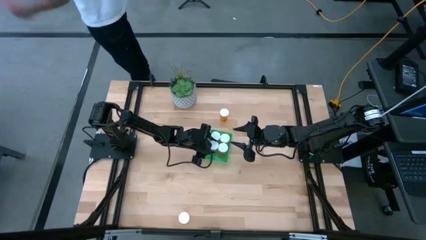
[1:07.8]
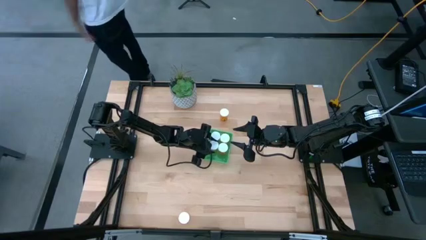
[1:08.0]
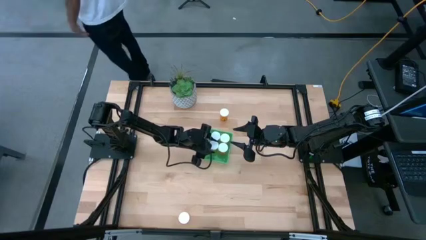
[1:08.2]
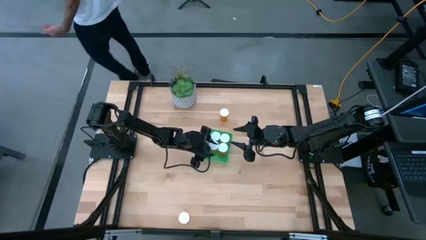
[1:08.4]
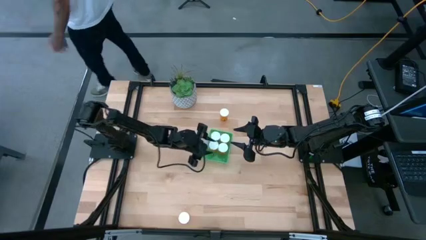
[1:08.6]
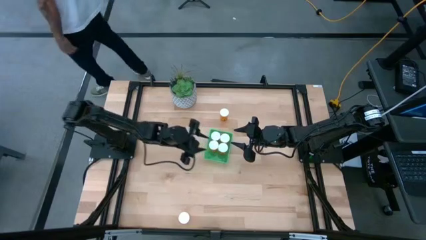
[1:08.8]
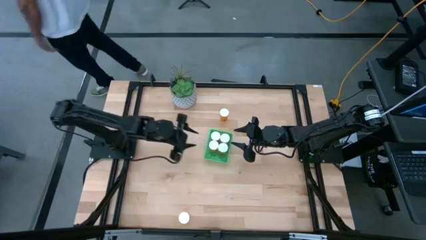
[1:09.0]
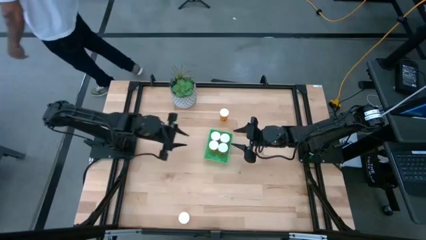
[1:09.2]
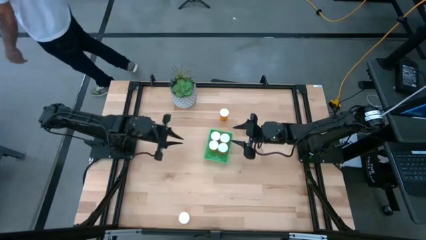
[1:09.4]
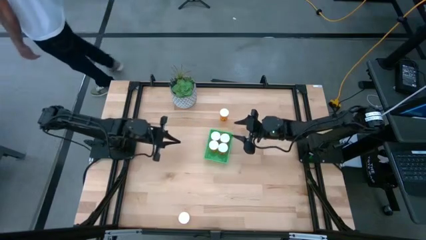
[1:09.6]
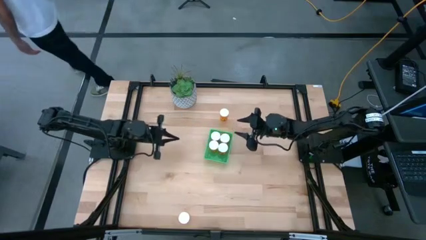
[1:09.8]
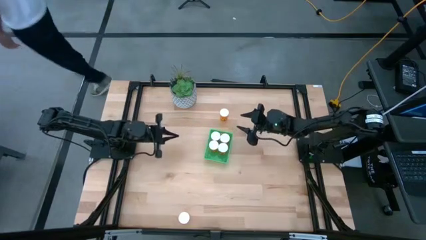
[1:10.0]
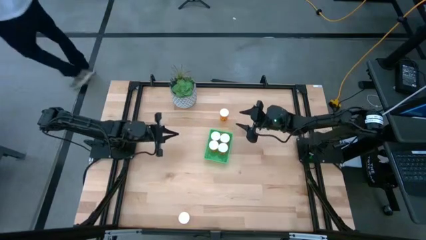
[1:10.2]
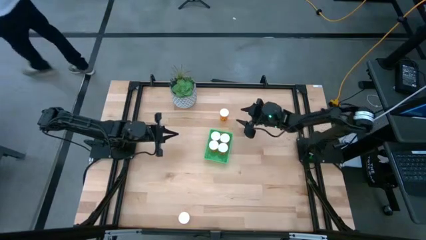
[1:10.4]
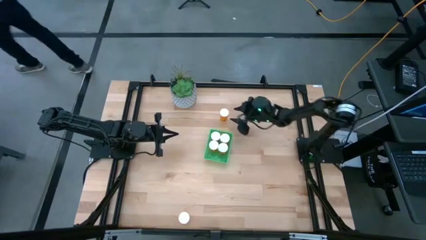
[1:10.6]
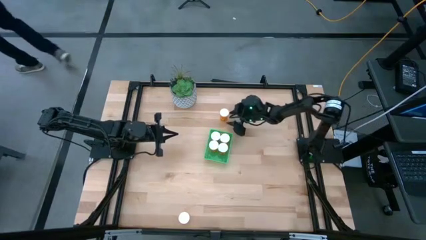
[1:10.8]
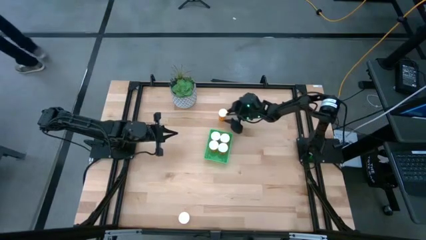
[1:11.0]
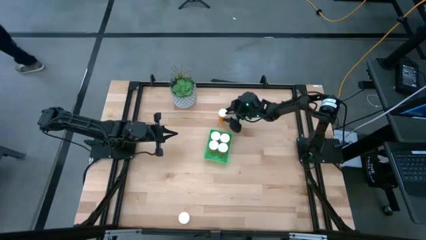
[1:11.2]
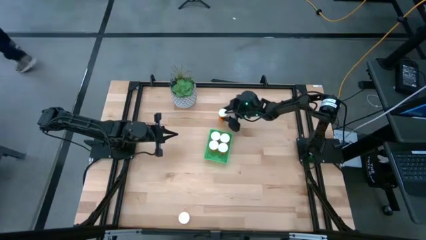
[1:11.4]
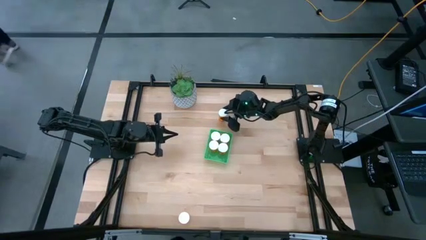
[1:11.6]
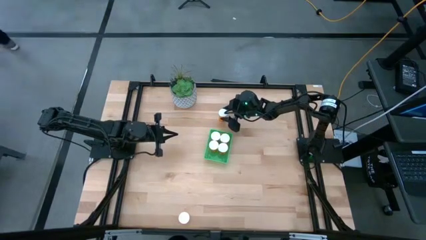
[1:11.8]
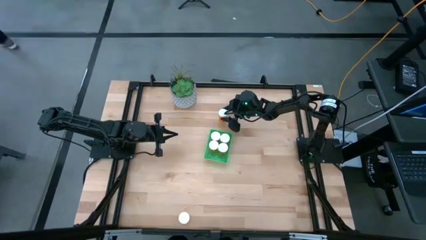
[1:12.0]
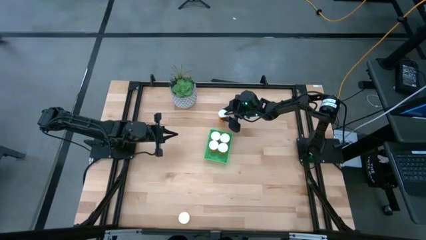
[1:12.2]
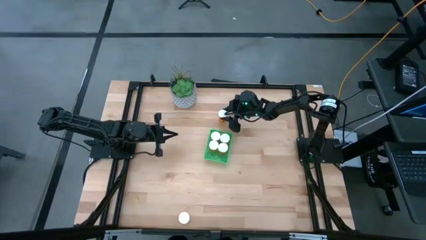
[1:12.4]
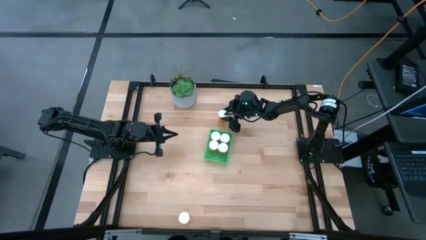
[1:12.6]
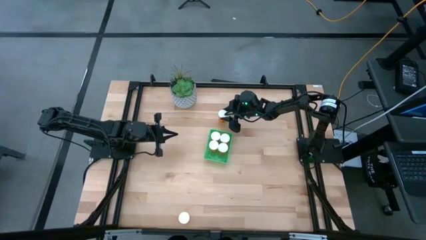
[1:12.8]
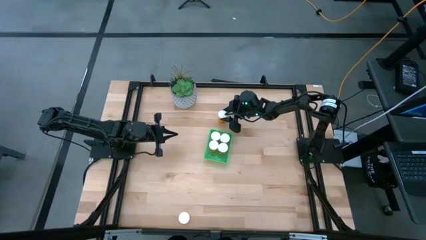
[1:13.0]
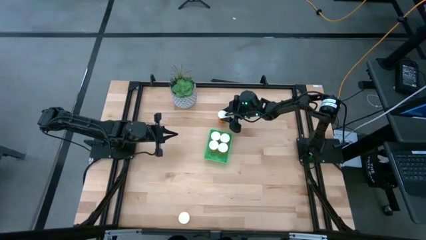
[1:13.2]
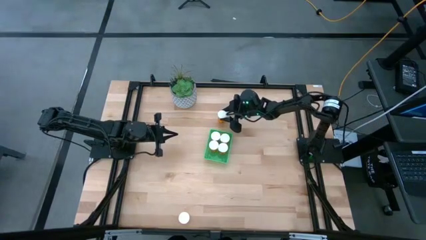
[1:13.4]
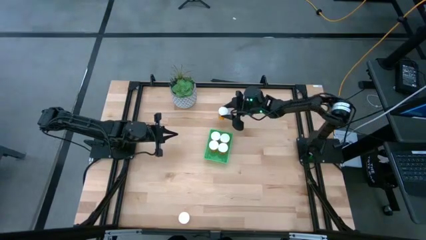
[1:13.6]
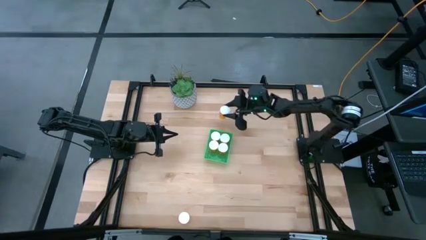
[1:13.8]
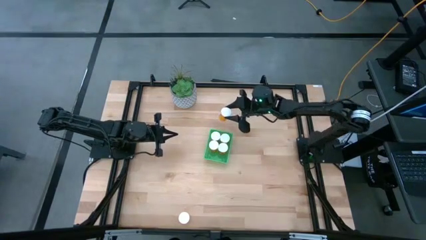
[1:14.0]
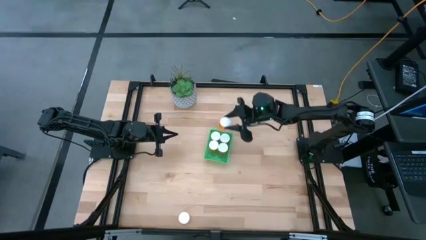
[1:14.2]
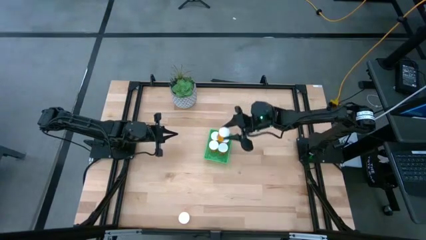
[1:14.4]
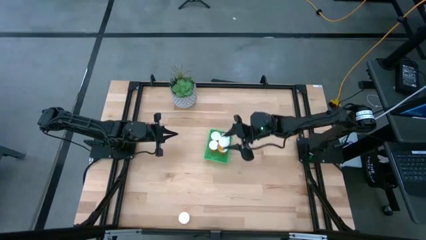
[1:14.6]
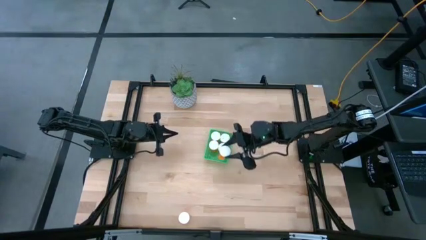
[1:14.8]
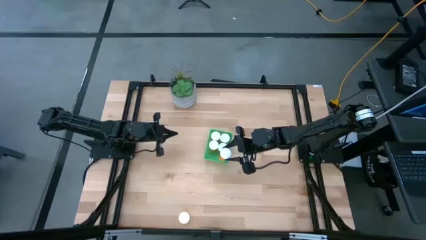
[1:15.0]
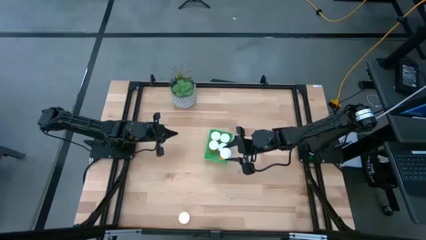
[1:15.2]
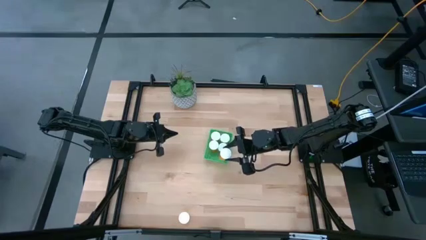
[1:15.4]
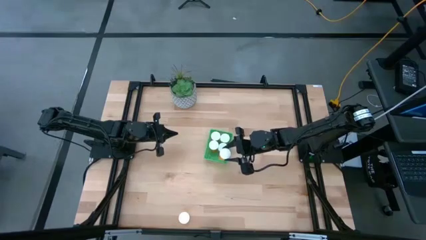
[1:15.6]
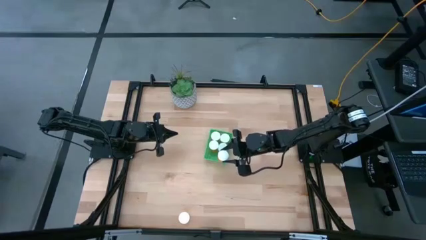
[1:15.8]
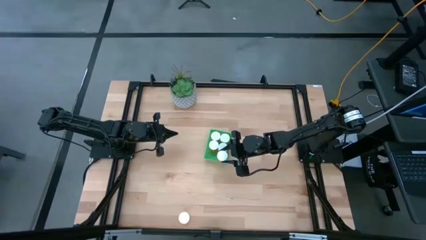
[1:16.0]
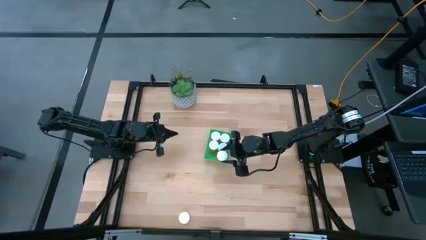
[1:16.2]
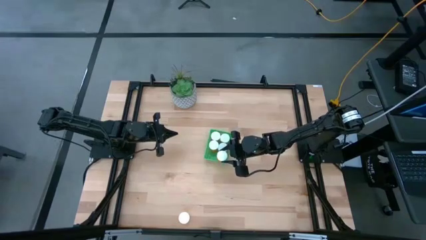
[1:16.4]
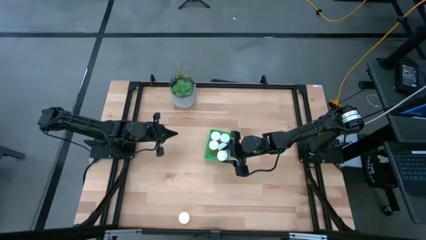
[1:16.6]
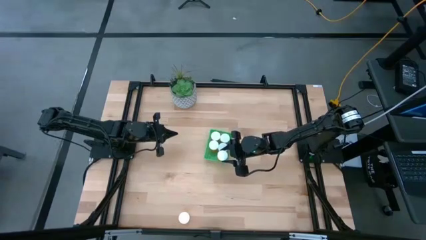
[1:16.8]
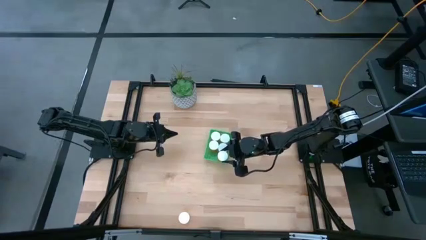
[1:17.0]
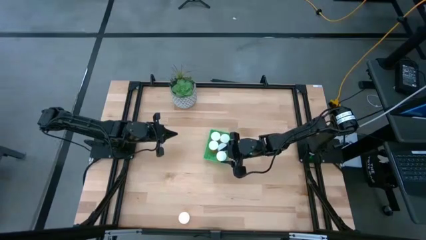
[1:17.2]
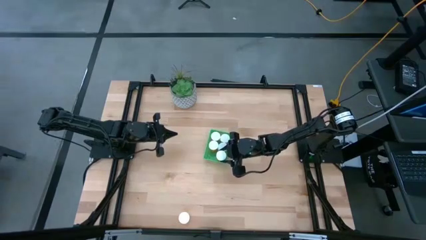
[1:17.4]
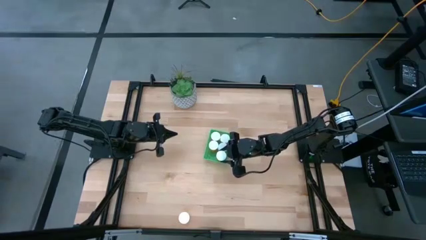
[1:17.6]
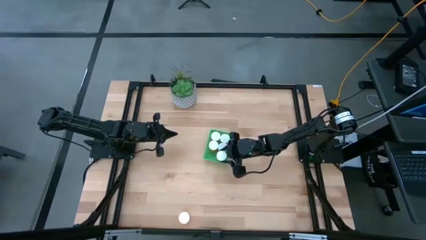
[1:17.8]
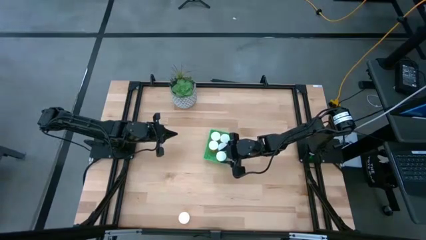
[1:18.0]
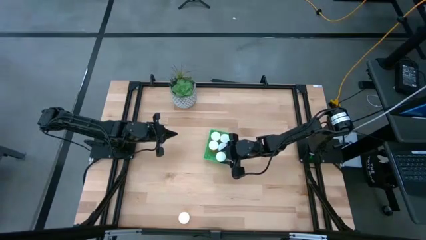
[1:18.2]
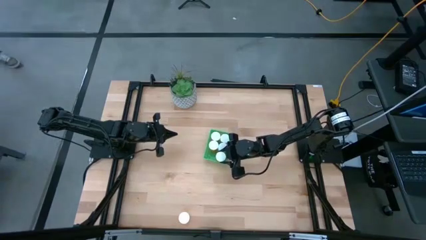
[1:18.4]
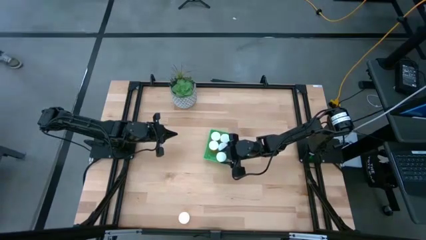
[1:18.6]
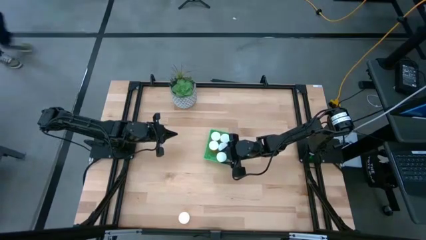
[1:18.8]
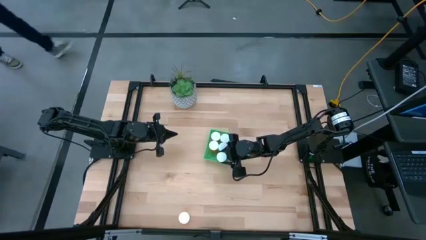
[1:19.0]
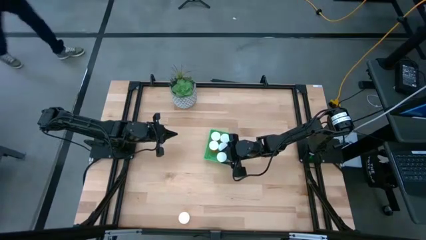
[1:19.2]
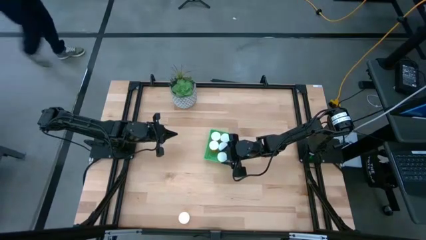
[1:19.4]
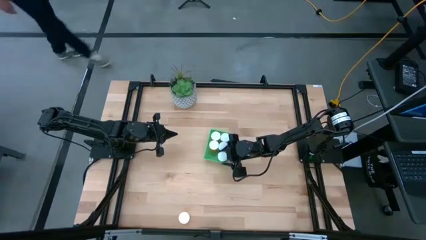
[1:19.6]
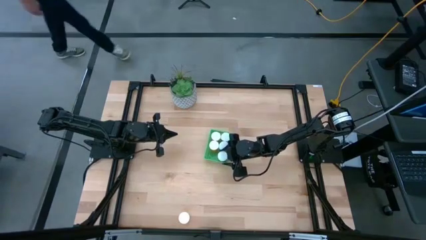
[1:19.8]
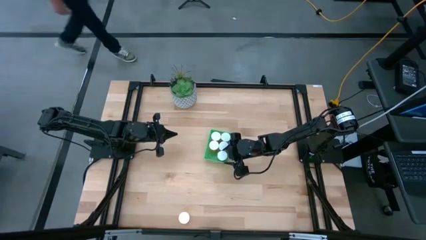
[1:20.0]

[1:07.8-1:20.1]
Task: Pick and place pill bottles into a basket
Put the orange pill bottle into the green basket

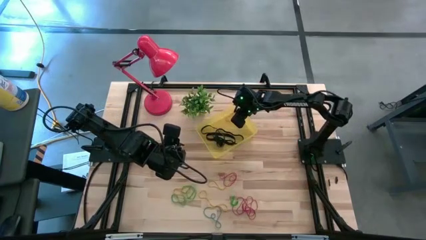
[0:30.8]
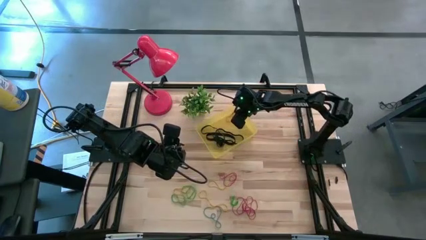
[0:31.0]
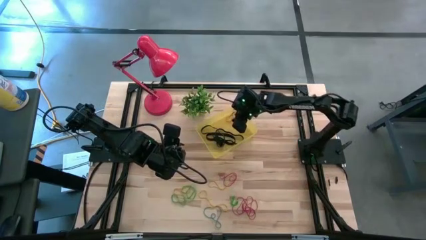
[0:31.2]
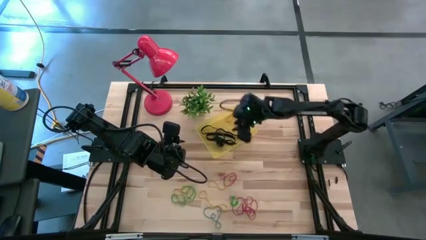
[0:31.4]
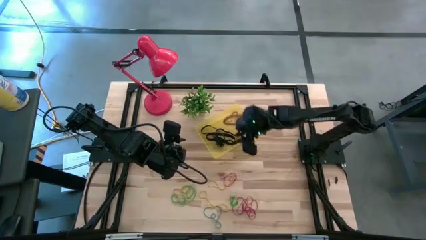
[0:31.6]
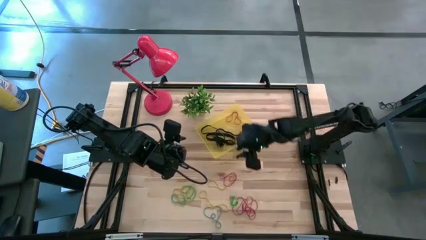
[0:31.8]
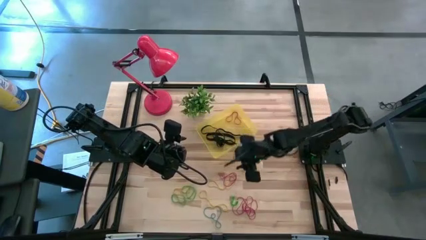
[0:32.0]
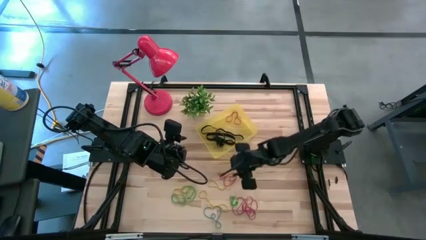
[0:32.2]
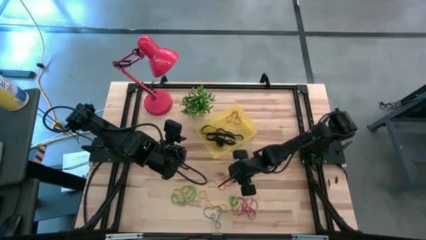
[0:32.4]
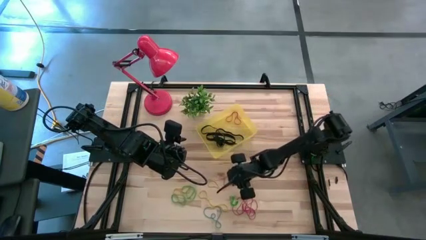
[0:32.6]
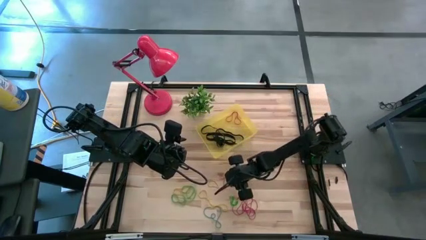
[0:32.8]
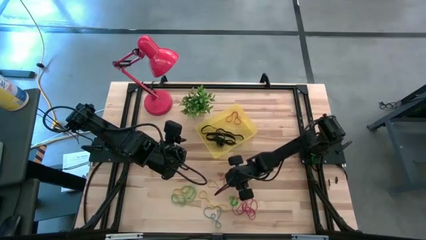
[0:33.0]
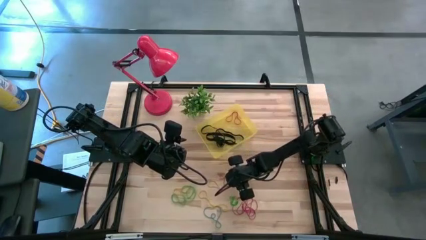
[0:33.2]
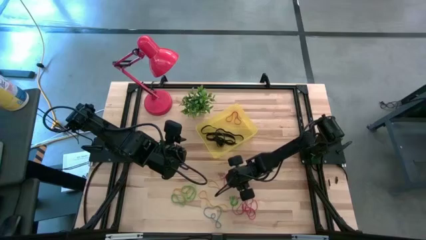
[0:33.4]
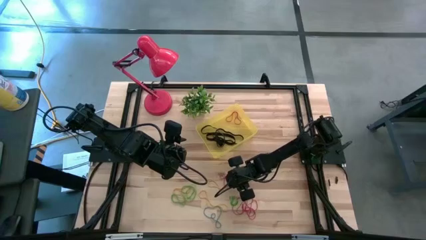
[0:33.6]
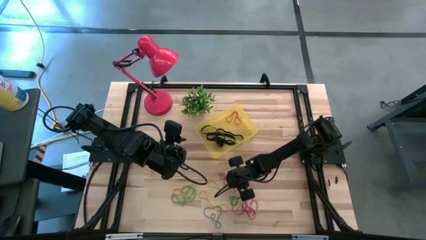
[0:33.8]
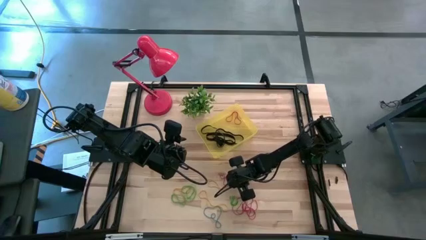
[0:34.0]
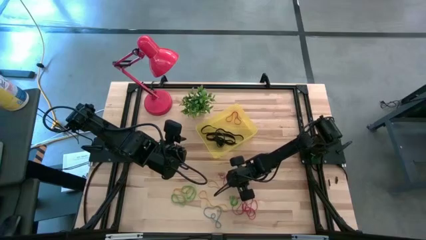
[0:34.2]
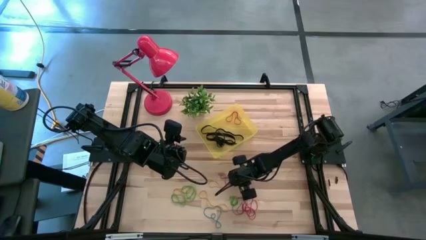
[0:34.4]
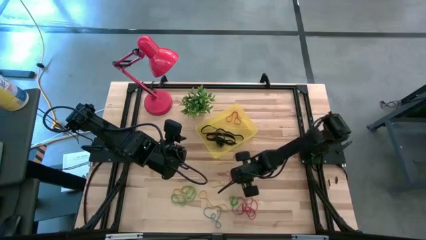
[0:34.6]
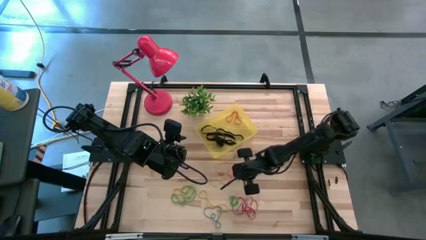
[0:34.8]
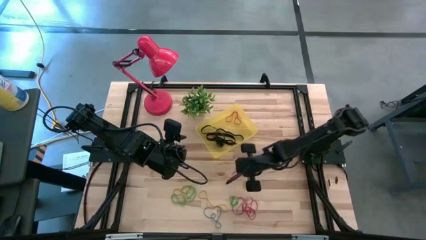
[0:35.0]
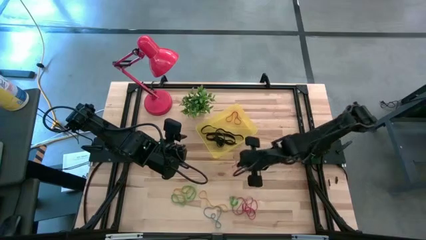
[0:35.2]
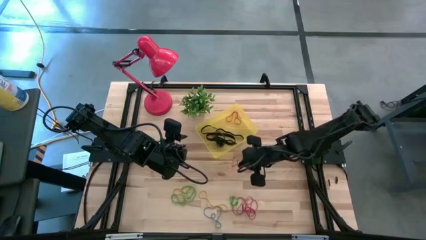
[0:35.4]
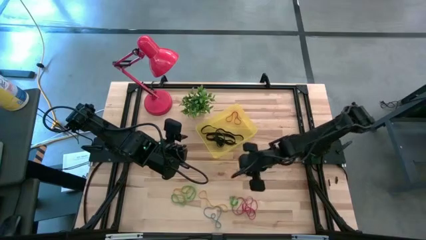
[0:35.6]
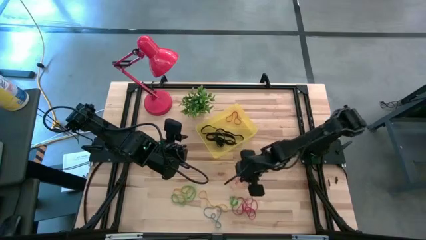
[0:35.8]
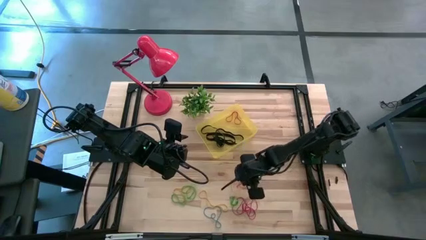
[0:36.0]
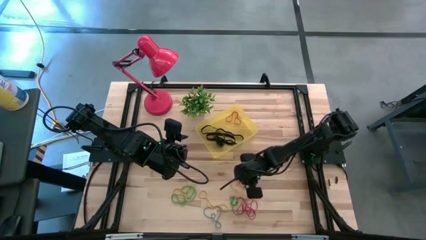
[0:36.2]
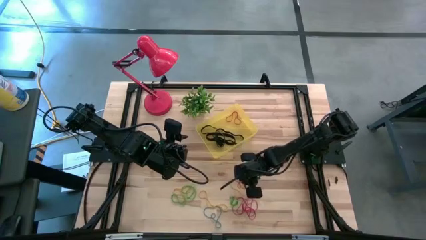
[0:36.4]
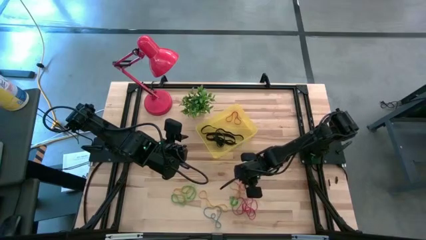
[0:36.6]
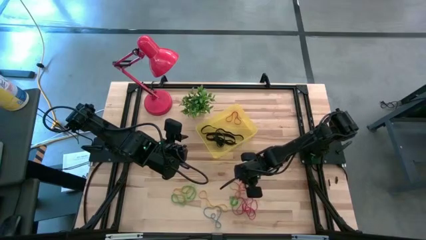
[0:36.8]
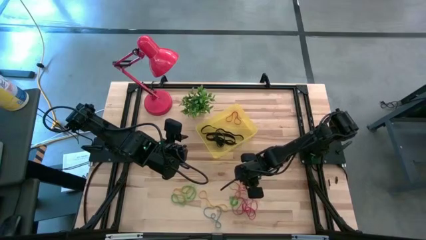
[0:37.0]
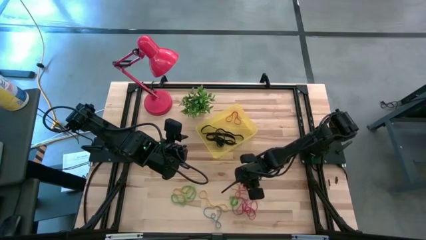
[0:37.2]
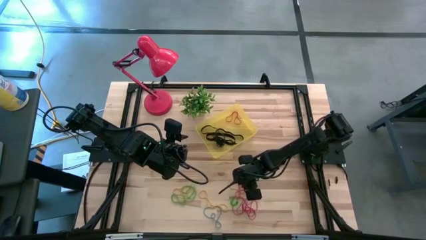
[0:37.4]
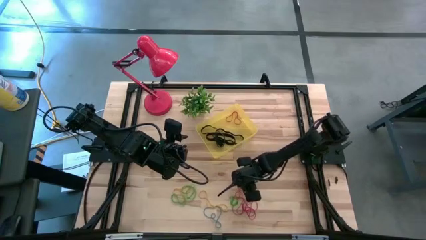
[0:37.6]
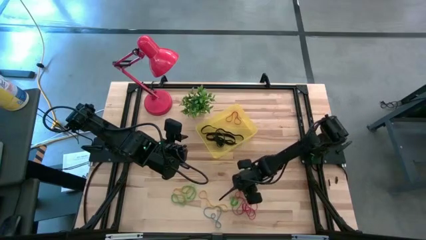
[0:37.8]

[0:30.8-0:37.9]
Task: Pick and place rubber bands into bin
Put the red rubber band into the transparent yellow bin
